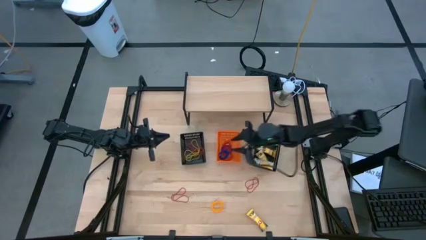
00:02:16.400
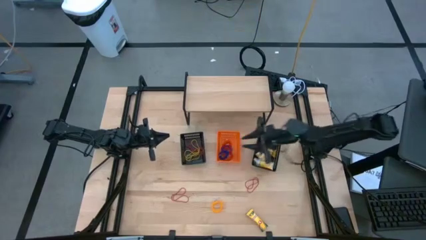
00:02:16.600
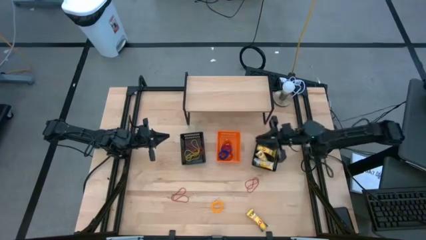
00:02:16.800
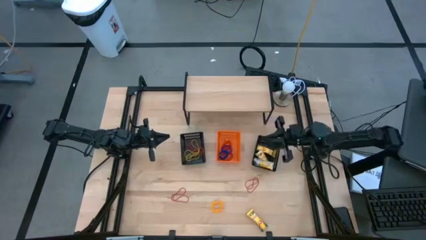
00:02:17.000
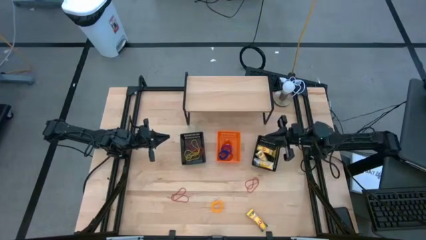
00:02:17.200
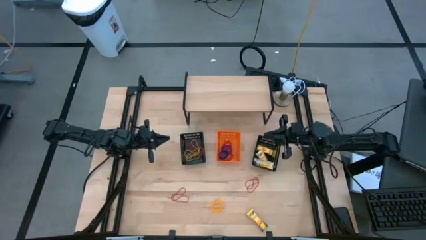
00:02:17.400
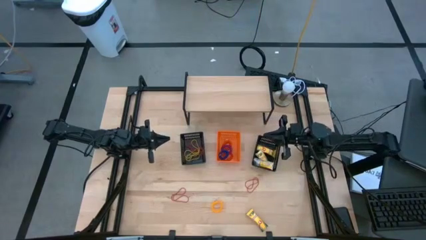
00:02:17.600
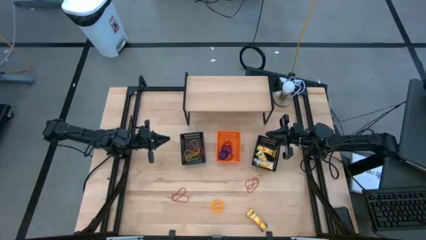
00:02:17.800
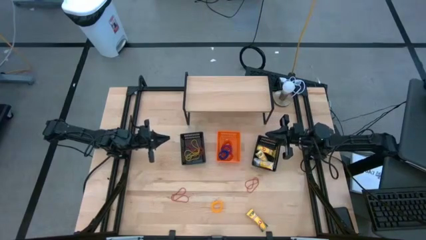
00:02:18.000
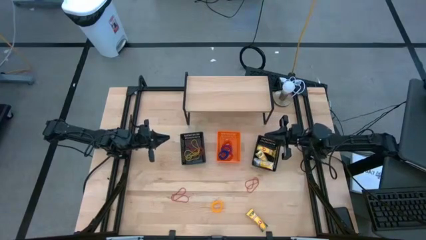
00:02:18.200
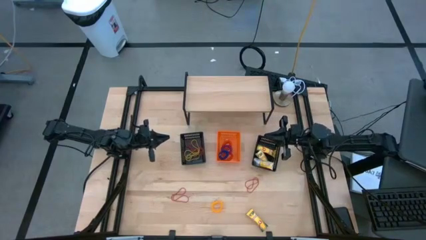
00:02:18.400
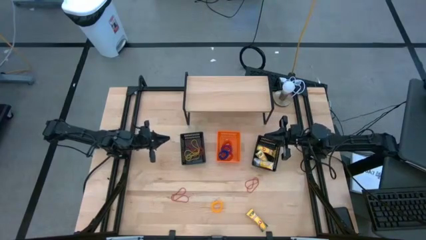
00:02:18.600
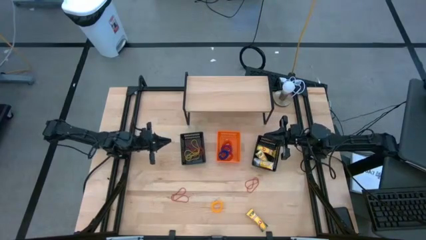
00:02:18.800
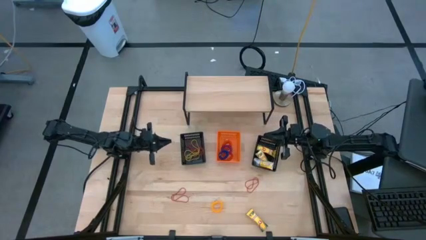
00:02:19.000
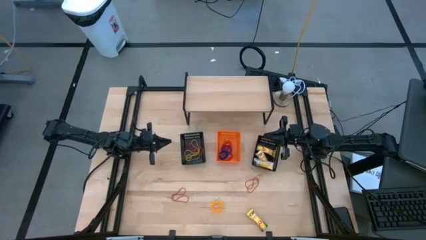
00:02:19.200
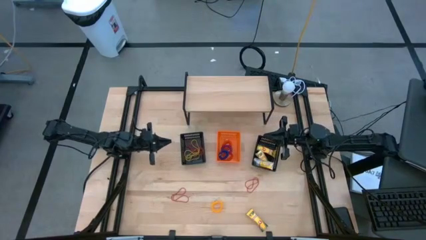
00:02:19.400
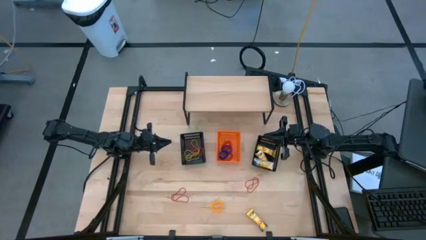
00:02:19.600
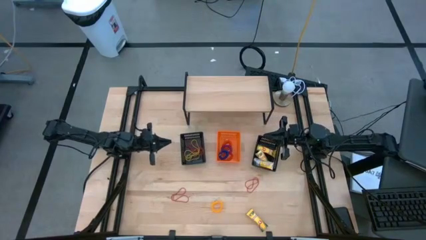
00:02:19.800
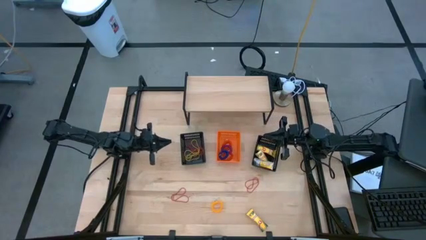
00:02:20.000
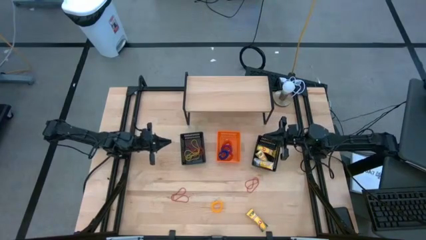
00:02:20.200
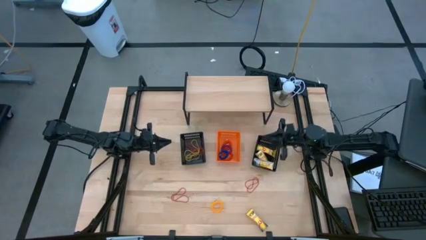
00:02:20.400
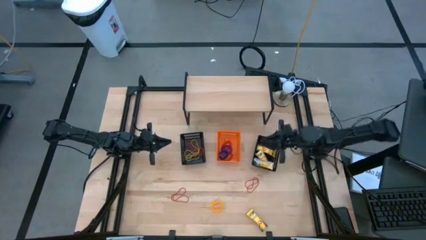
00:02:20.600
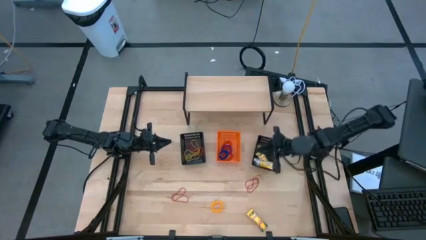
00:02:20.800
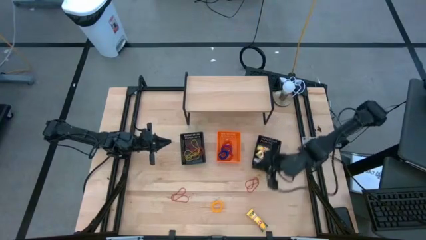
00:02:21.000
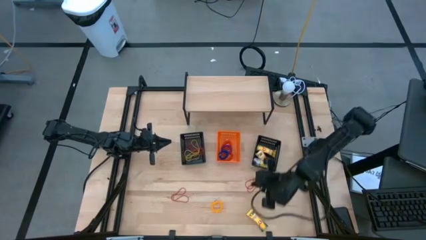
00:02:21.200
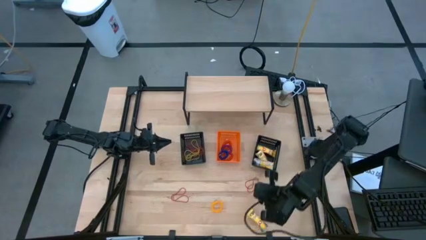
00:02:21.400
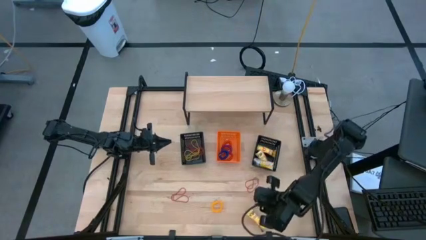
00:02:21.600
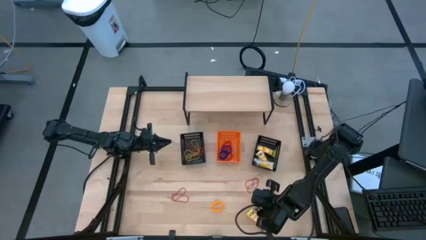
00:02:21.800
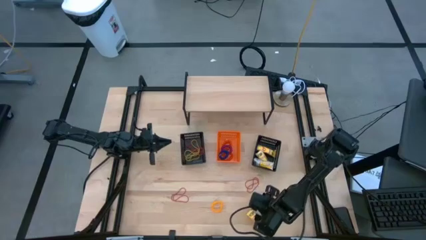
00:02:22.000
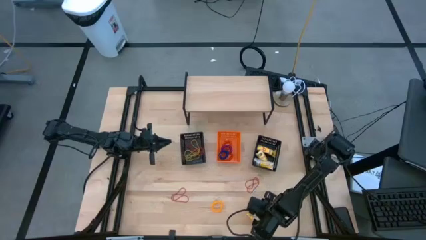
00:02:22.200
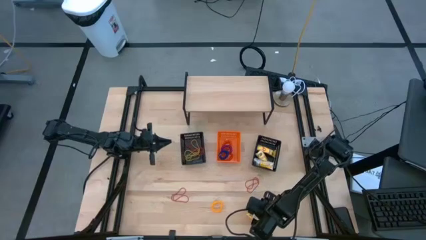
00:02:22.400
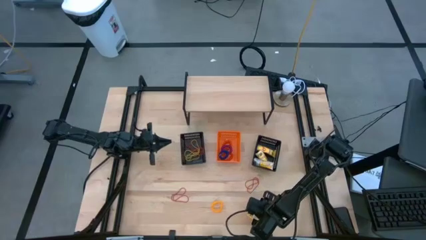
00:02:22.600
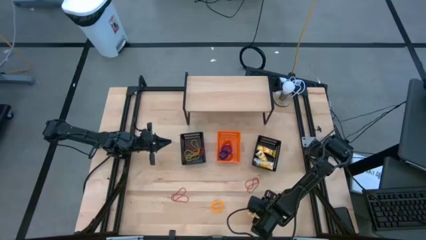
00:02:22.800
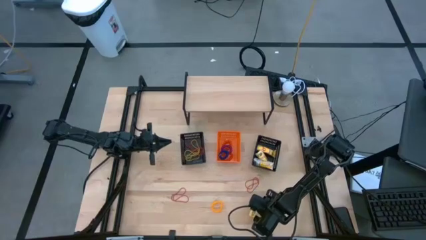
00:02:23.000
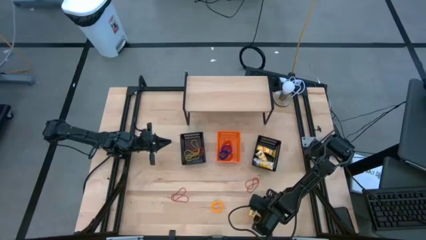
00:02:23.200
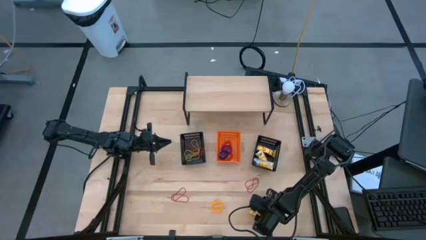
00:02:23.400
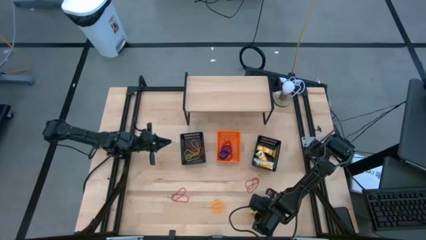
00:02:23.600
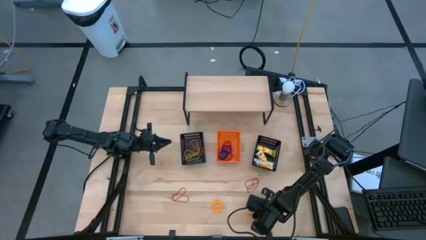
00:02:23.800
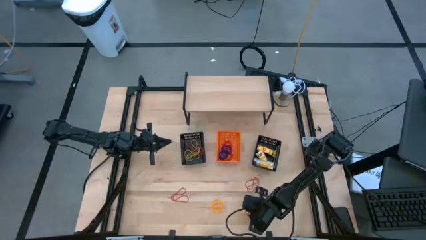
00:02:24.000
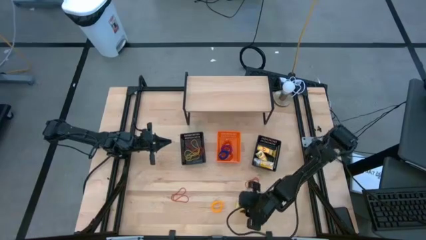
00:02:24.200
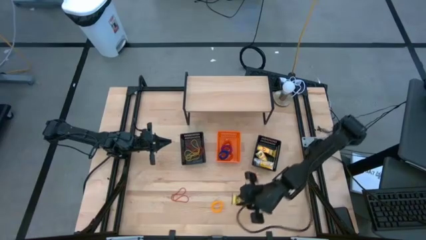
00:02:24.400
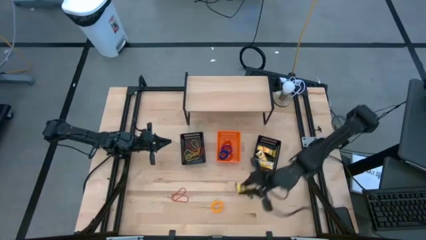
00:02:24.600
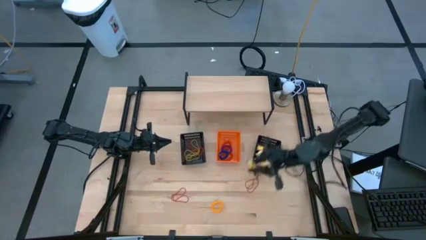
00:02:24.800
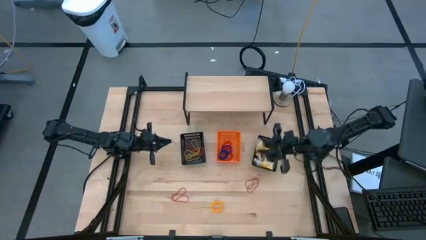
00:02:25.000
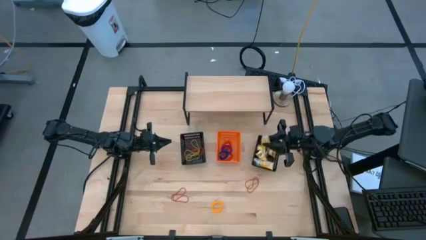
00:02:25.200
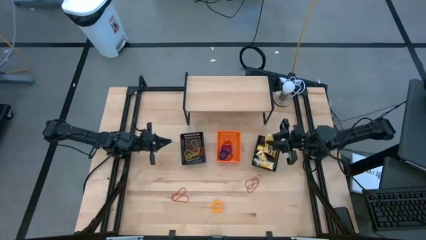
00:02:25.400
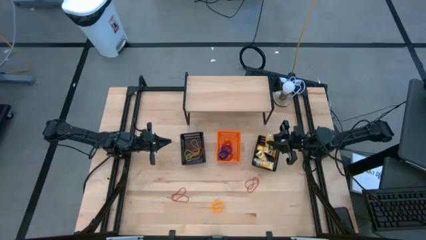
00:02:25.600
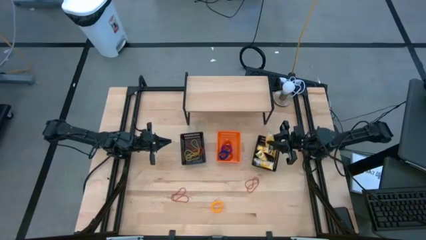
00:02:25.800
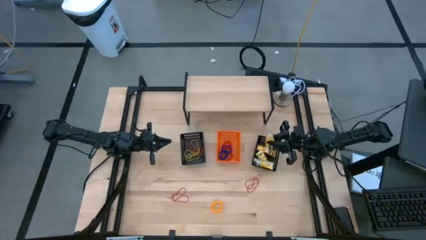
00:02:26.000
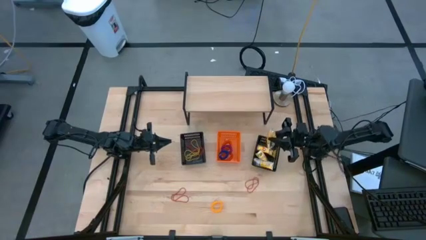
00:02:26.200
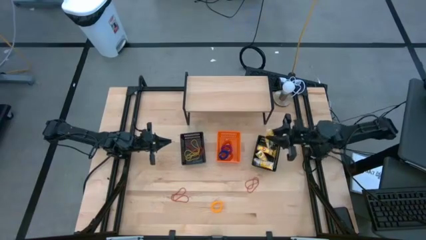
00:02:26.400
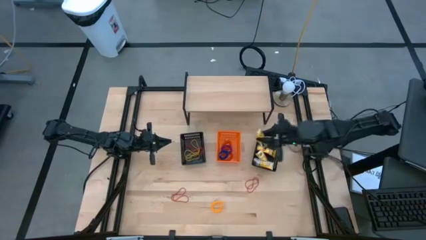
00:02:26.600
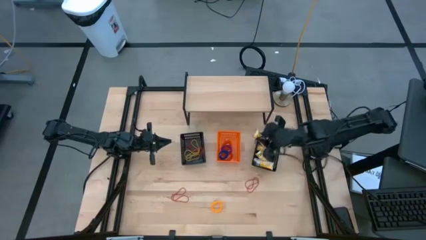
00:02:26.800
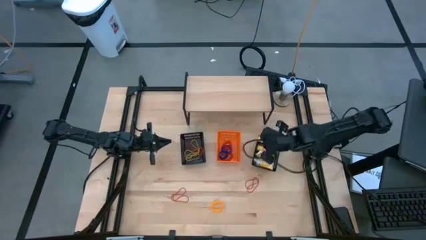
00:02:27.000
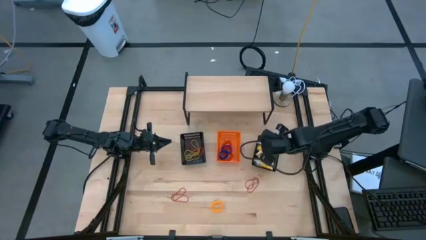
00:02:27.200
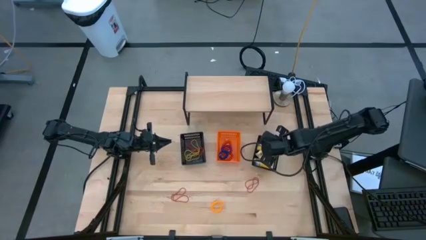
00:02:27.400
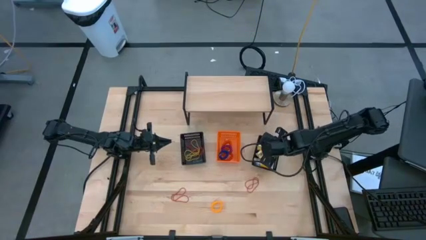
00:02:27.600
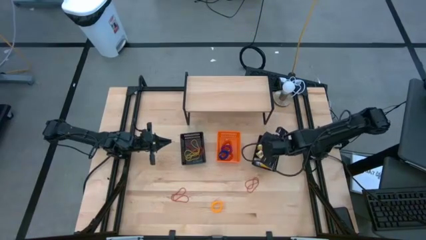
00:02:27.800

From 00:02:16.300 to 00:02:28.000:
Task: Pick & Place Office Desk Supplies
Put the crayon box into the right black bin

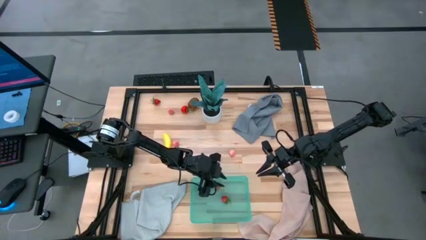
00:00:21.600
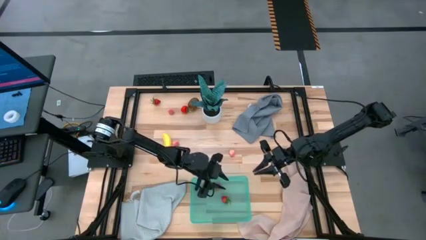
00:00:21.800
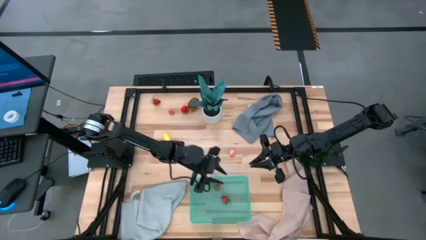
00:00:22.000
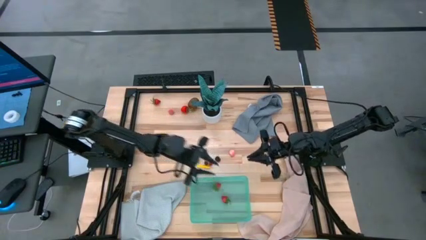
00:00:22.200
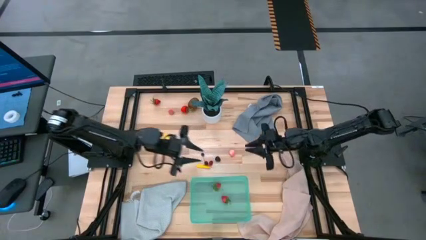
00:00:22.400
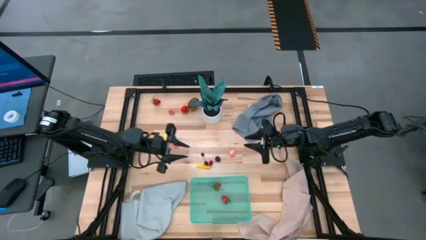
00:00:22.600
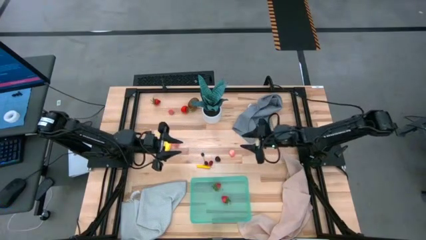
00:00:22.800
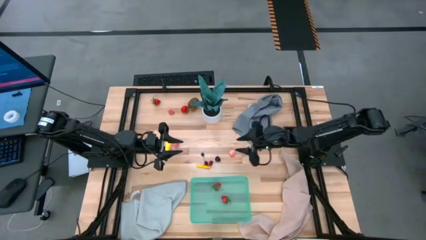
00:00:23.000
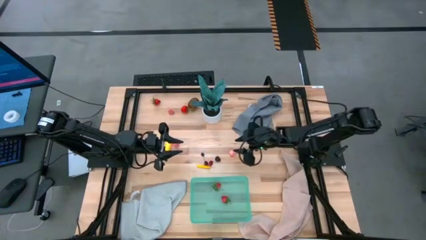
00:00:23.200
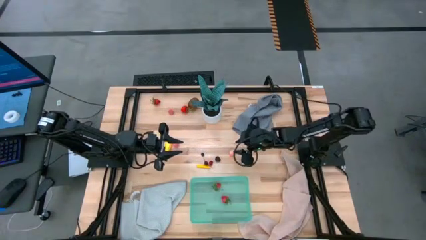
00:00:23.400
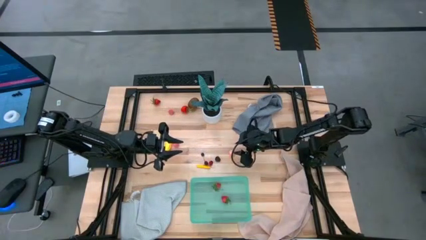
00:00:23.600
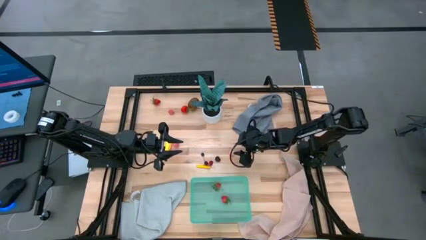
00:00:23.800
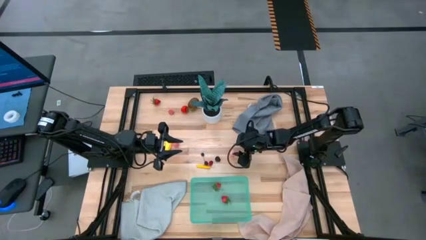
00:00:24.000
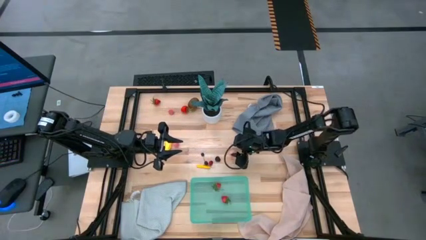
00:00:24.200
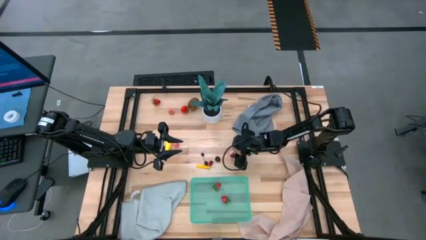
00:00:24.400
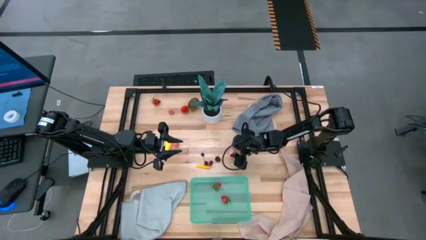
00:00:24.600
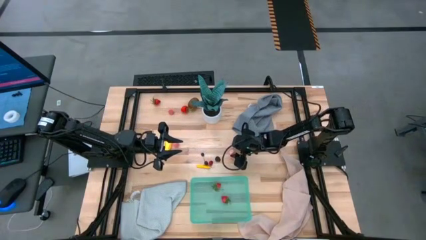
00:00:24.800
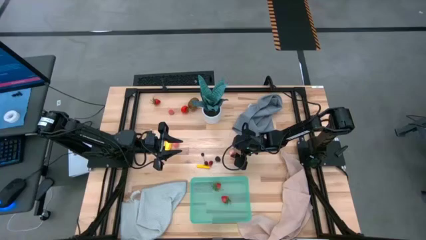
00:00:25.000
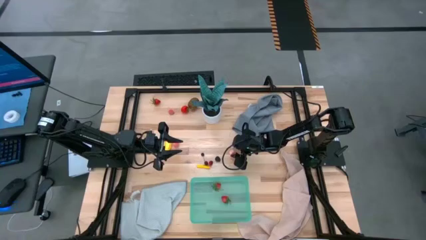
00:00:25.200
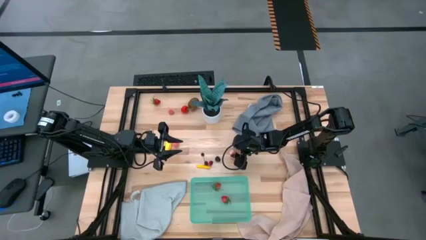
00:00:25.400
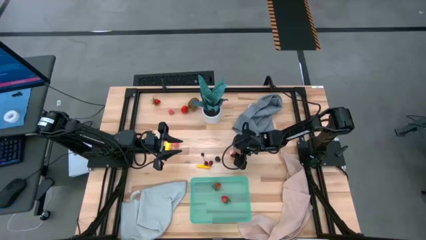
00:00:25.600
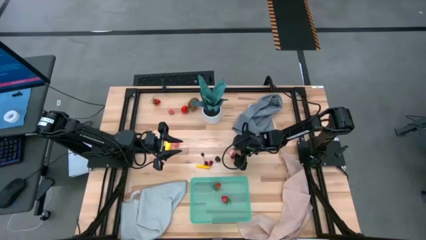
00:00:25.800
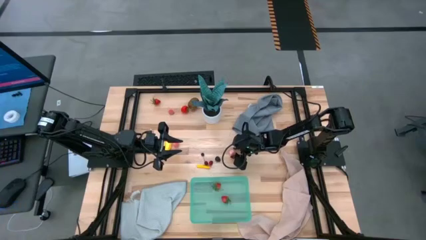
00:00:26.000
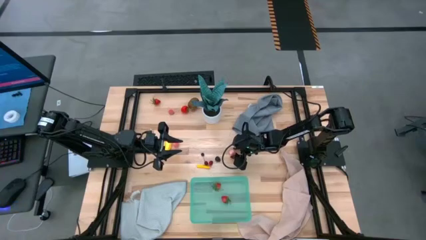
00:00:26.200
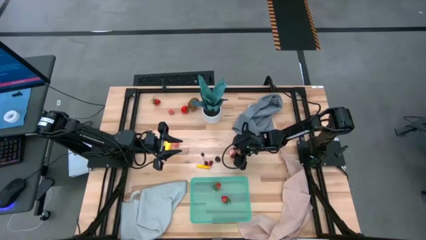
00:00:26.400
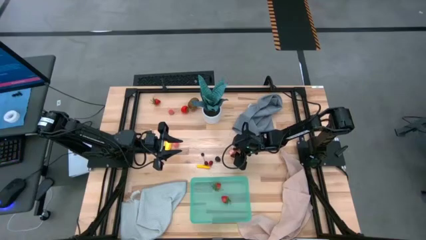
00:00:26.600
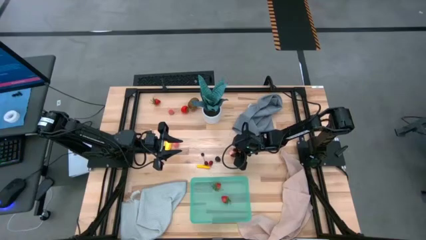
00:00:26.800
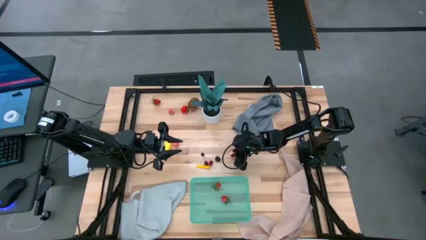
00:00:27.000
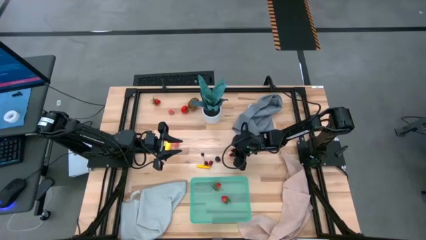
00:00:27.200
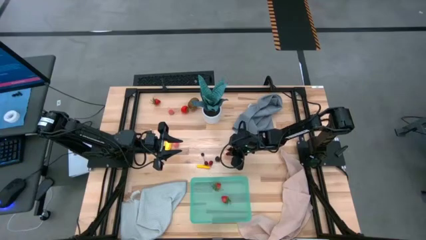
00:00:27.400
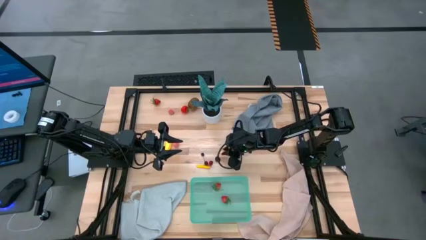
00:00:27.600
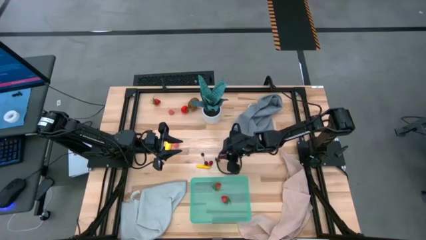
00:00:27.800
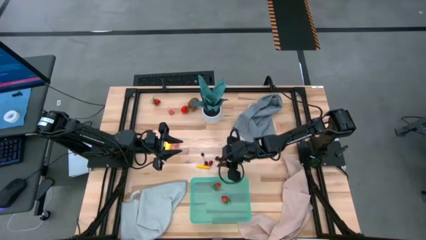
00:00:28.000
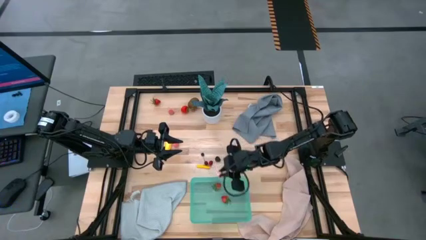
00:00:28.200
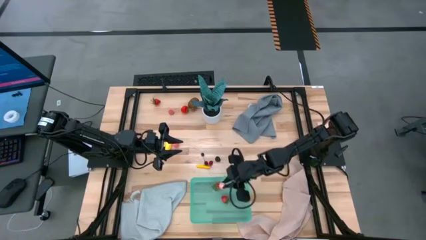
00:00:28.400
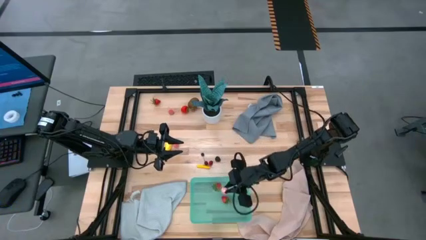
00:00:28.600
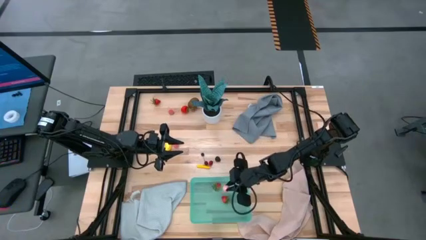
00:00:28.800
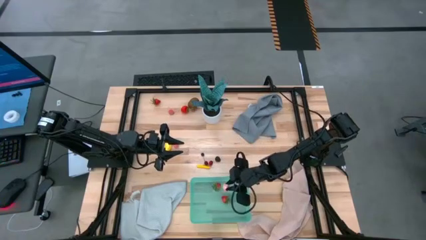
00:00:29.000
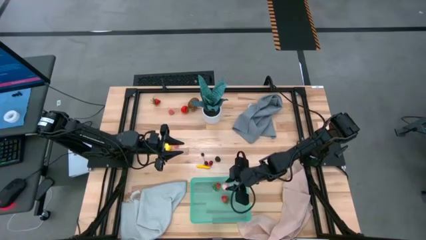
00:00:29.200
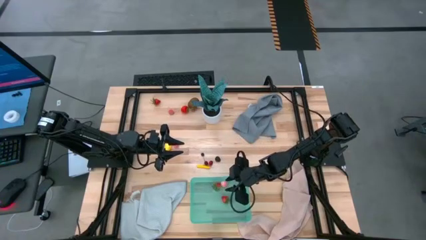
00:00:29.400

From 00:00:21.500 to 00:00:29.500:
Task: Pick and placing Produce into tupperware
Put the pink peach into the green bin
